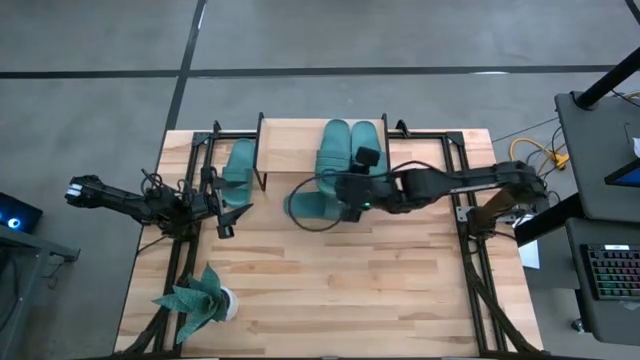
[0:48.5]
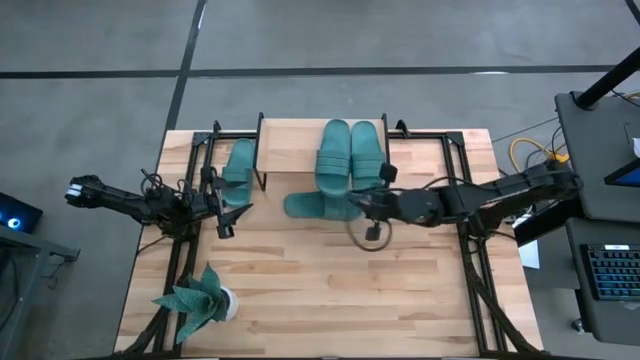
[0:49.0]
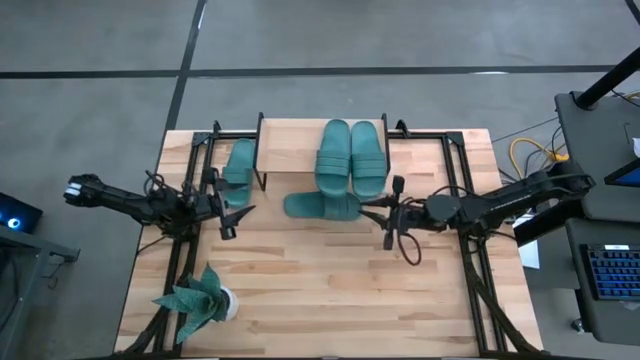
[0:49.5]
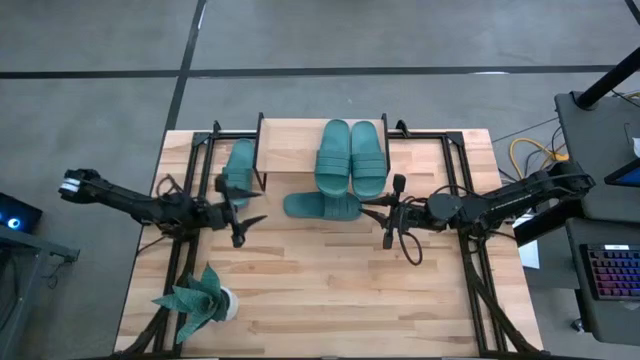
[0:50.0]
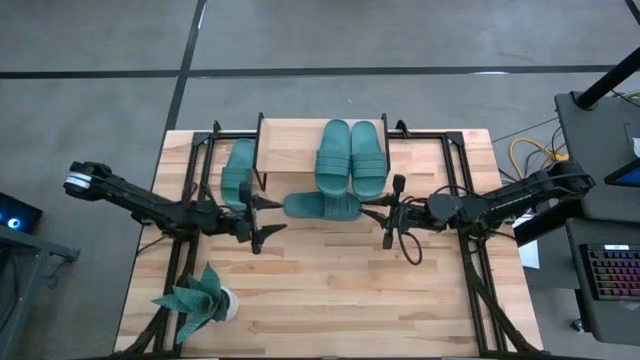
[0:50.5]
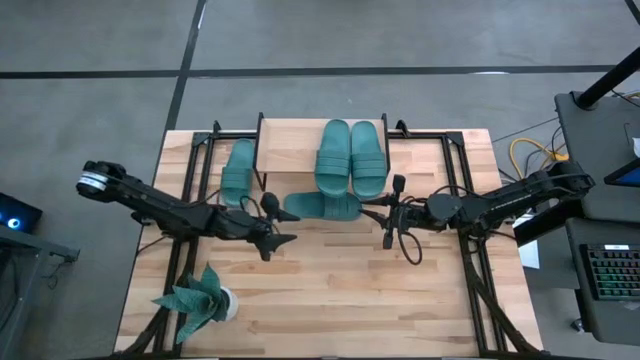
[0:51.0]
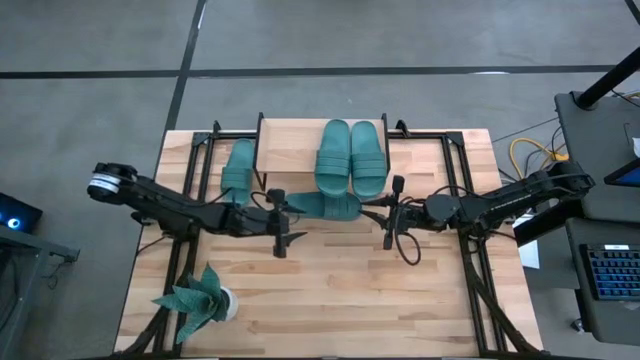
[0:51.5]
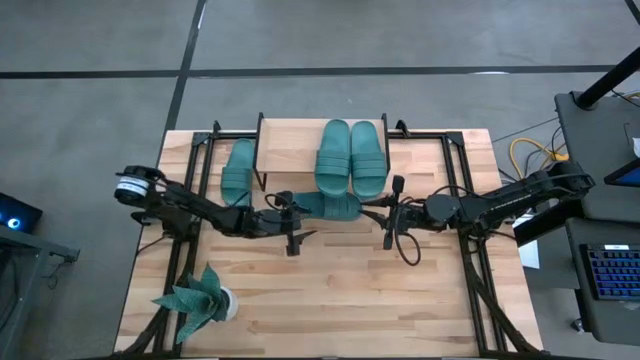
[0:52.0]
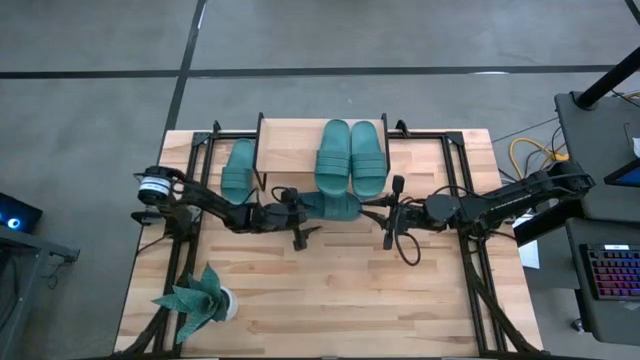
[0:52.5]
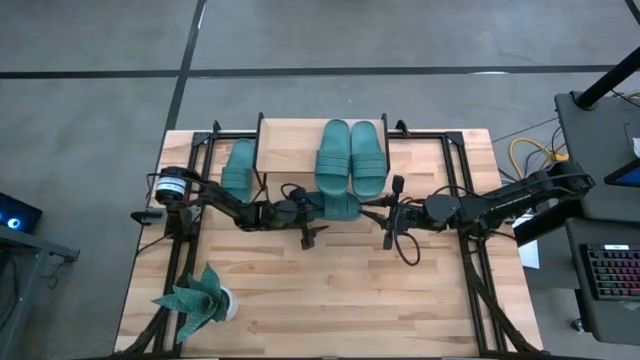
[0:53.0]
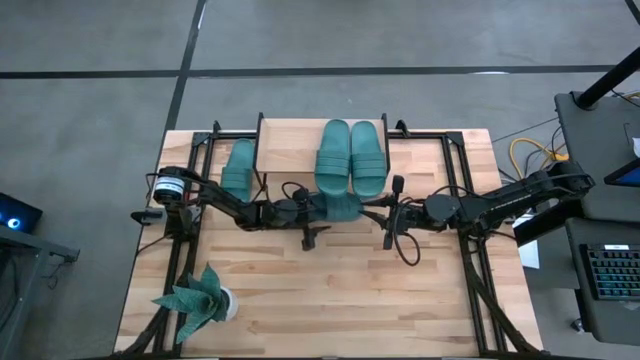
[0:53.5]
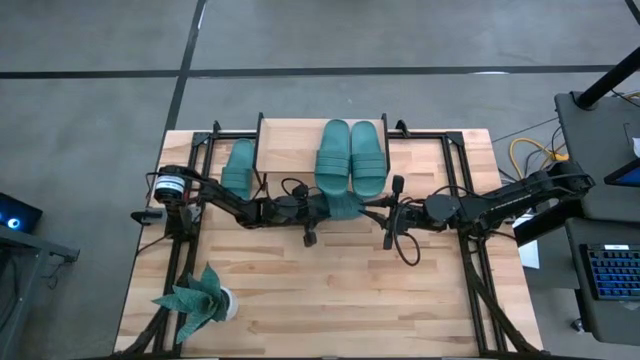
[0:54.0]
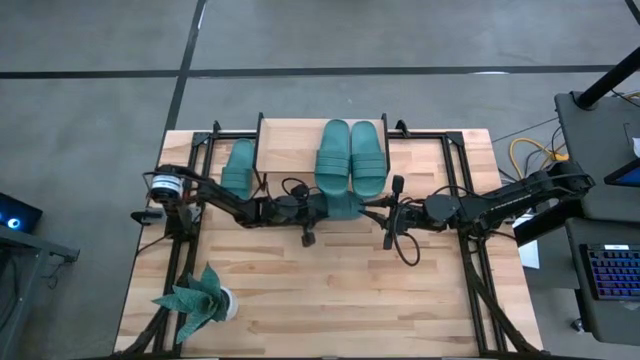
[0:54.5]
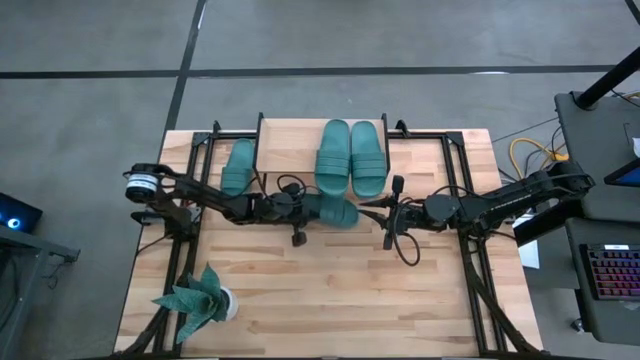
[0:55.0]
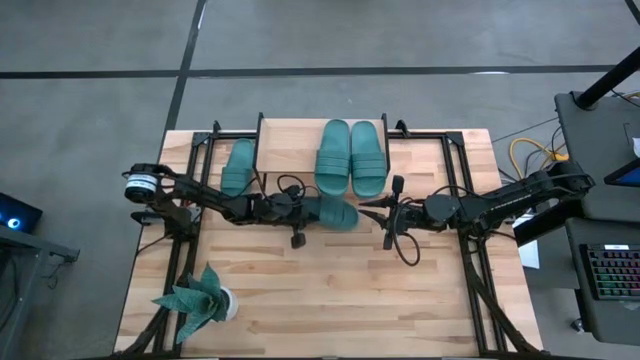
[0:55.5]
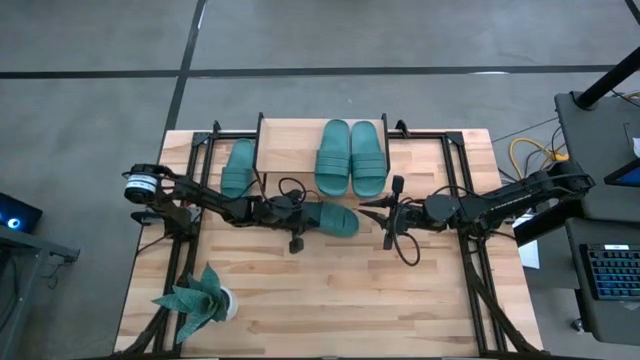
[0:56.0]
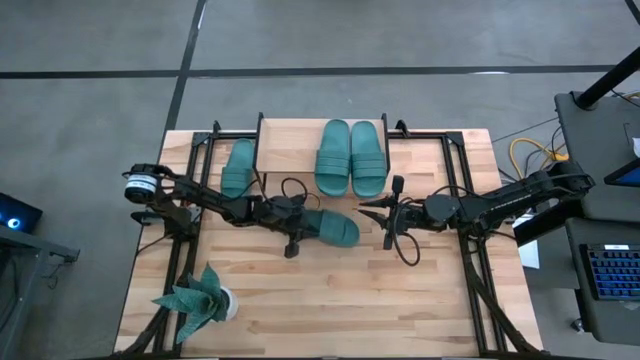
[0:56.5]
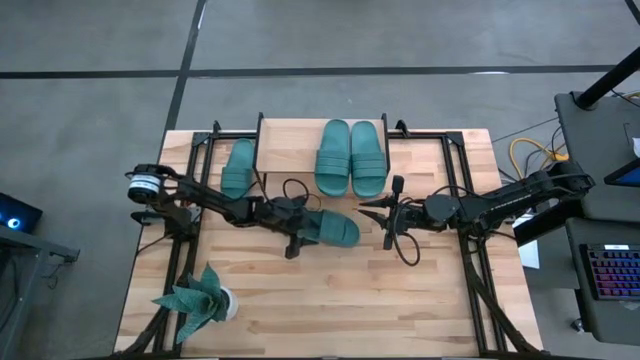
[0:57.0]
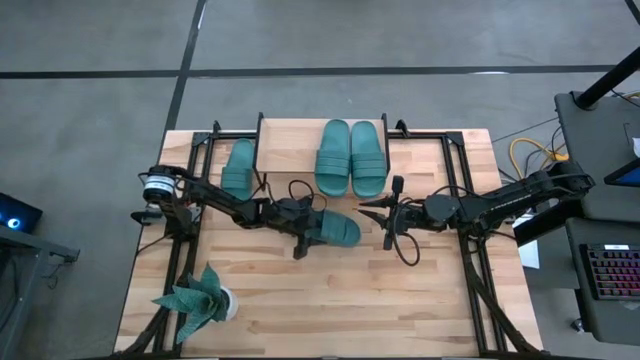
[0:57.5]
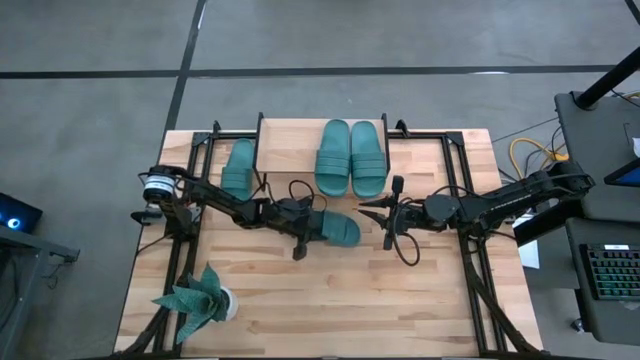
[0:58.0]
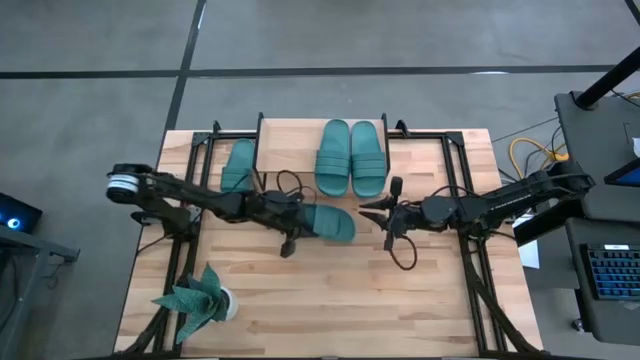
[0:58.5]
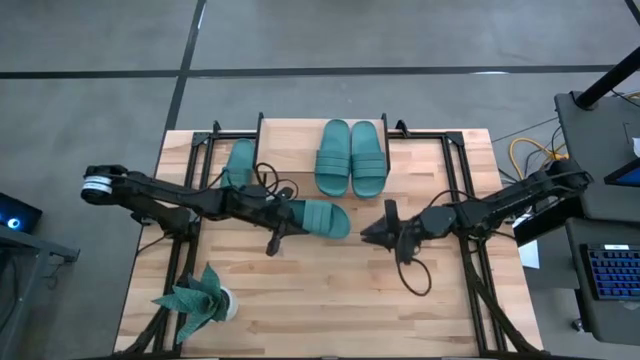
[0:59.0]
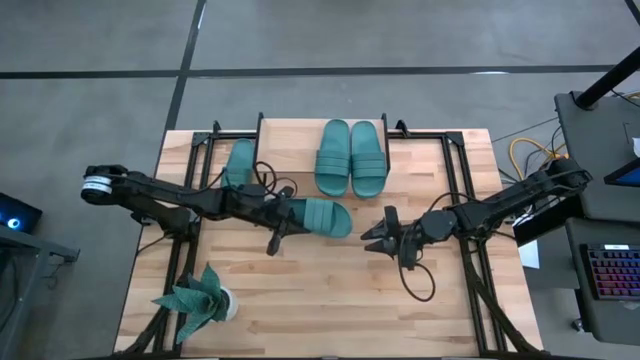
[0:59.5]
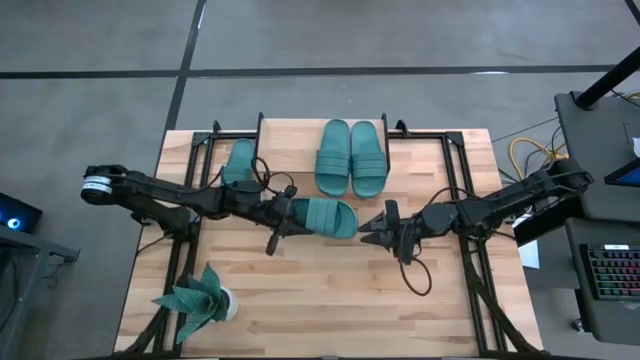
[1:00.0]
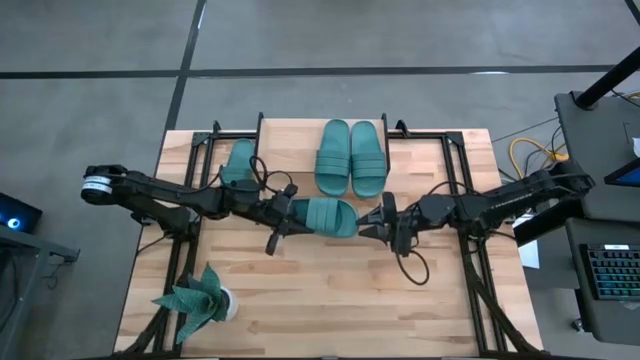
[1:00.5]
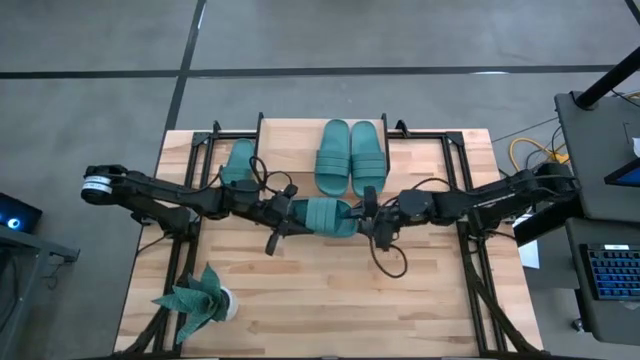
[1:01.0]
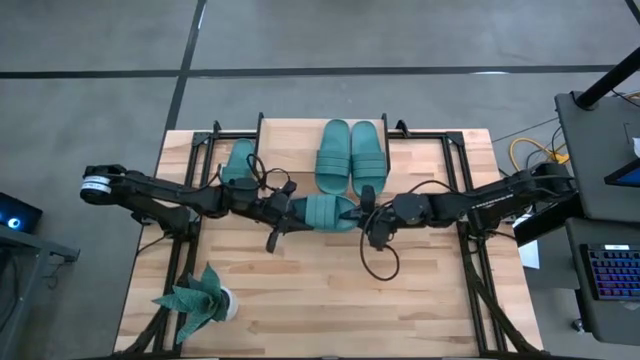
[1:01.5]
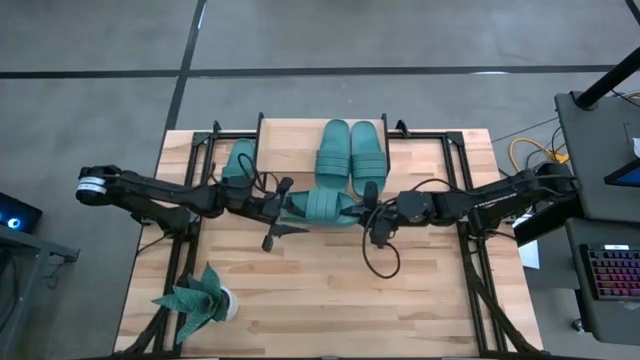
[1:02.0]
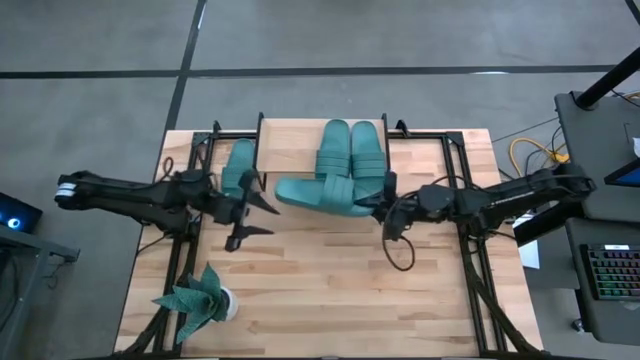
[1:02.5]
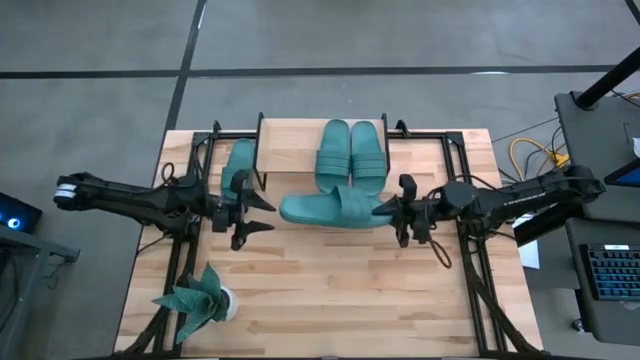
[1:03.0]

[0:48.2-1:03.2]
Task: Pick and place slides into the shelf
Put the right green slide on the shelf

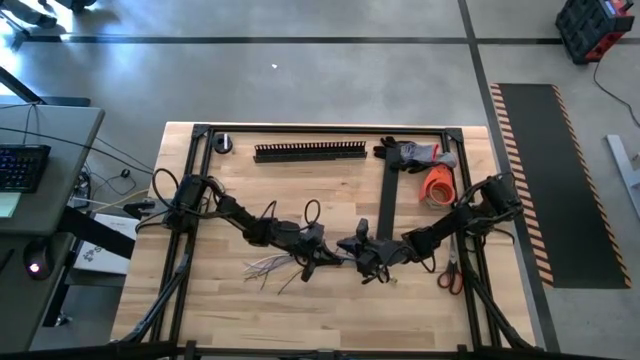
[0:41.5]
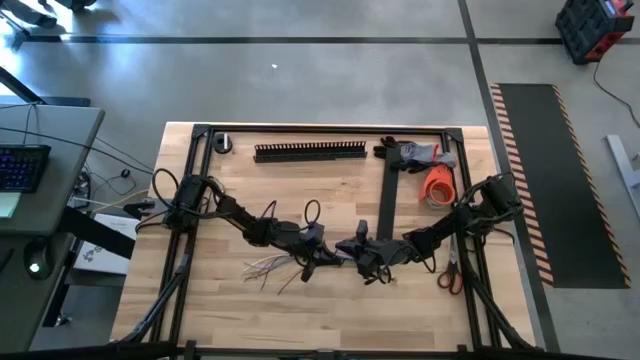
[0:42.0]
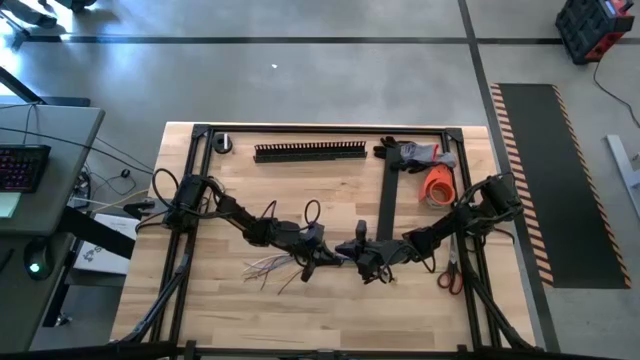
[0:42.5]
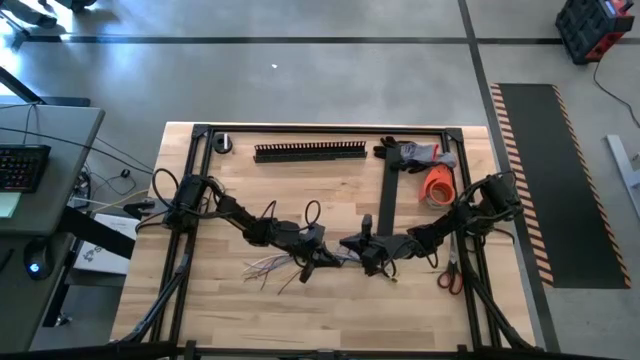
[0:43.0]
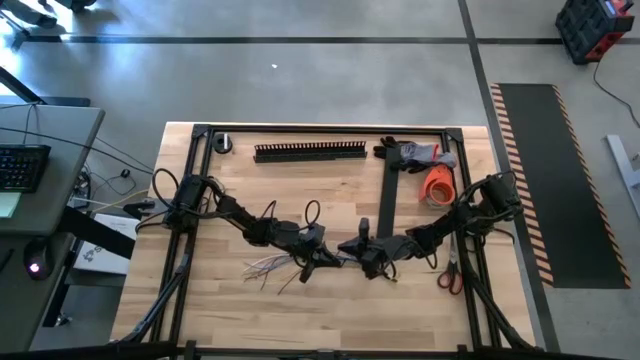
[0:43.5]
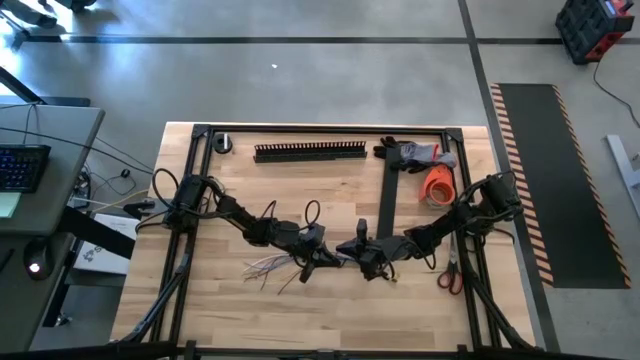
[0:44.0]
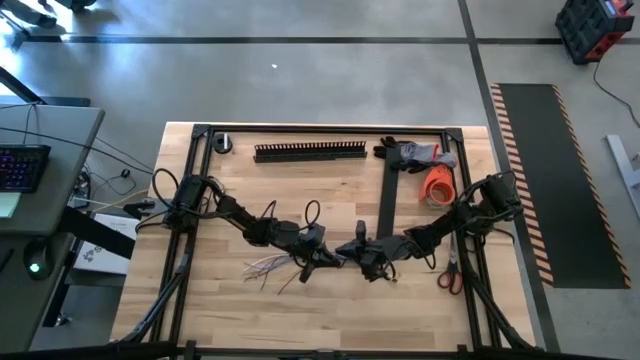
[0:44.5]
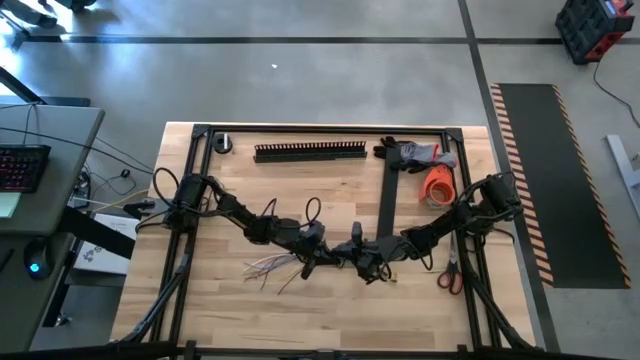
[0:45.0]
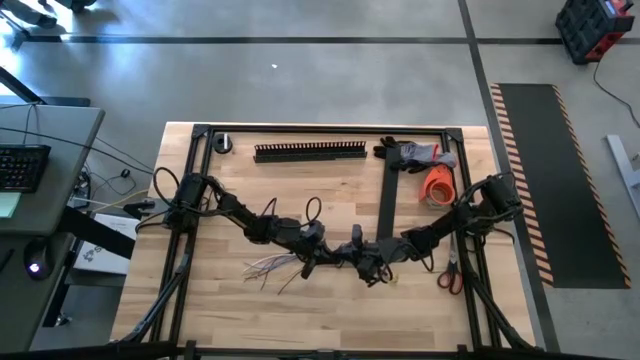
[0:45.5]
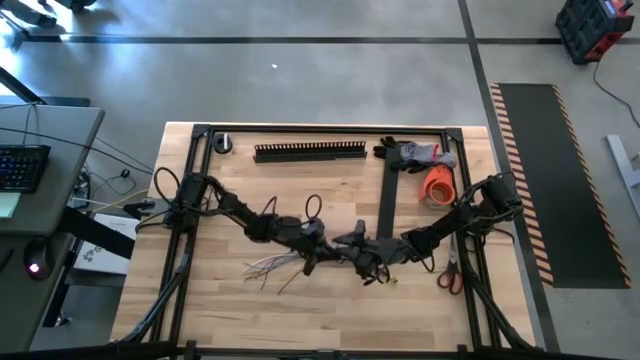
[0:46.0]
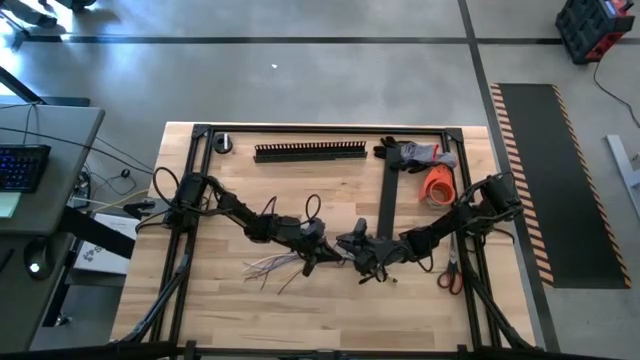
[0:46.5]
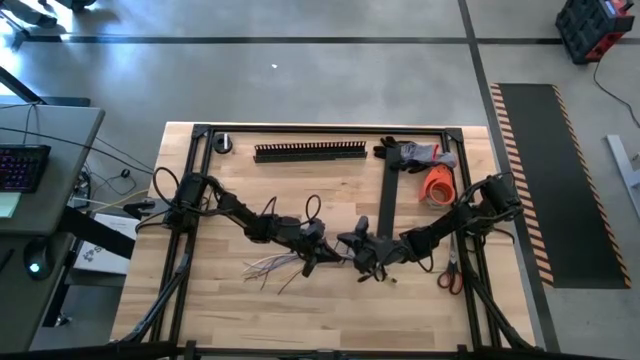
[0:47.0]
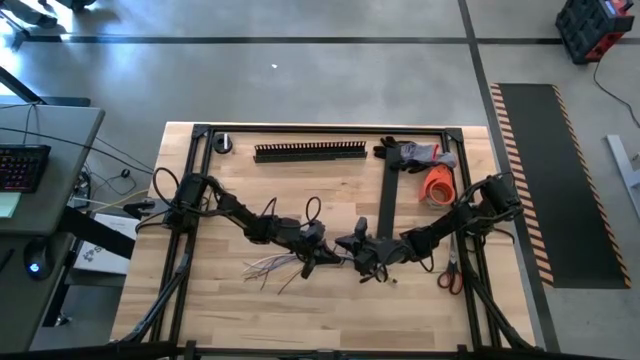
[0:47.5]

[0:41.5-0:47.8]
Task: Ziptie cables
Wrap the cable wires using the black zip tie
